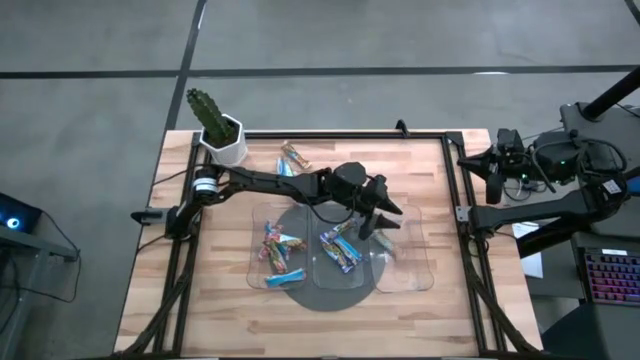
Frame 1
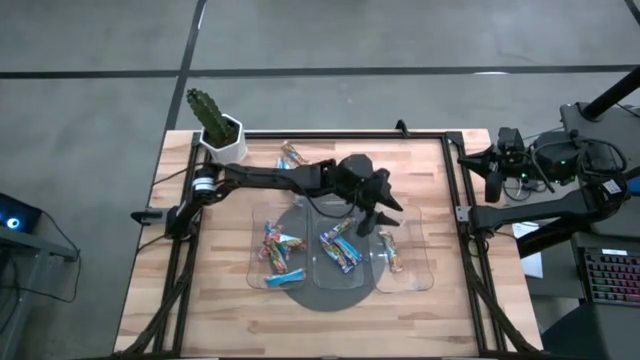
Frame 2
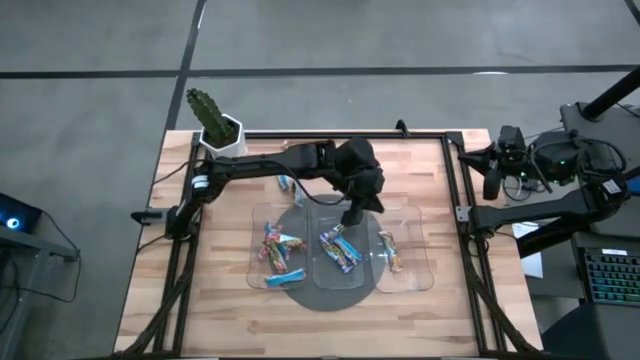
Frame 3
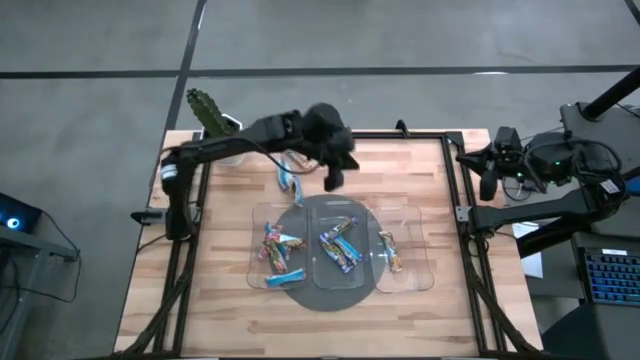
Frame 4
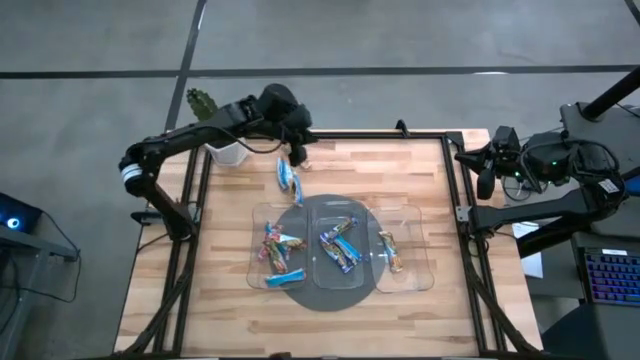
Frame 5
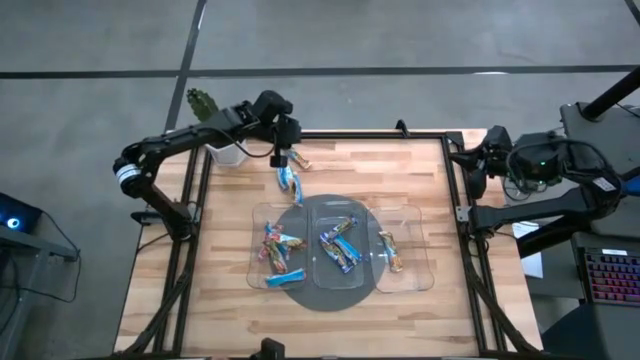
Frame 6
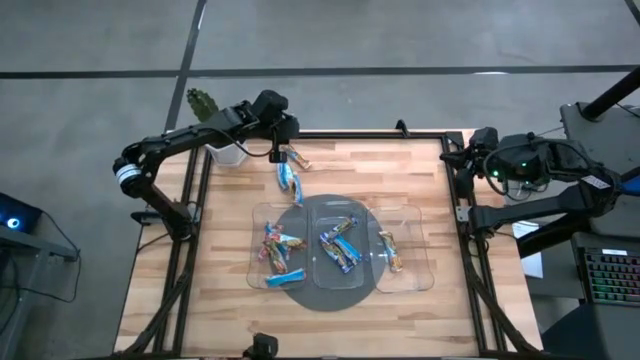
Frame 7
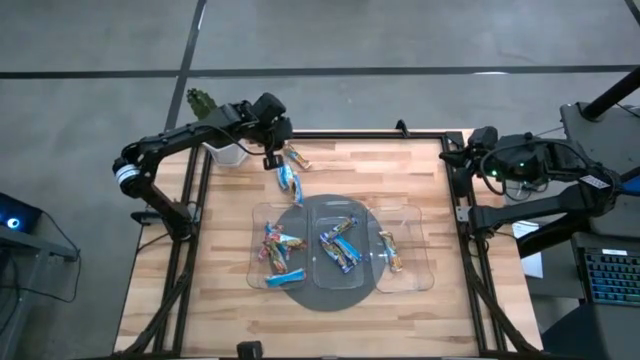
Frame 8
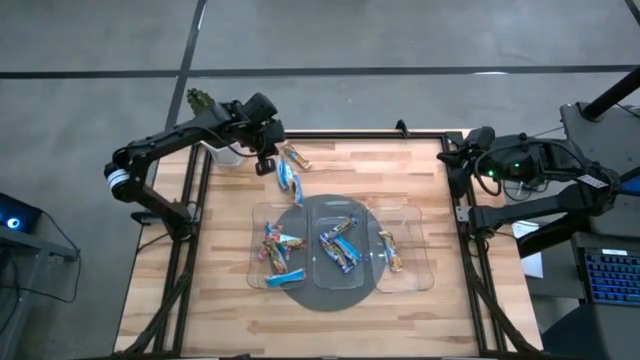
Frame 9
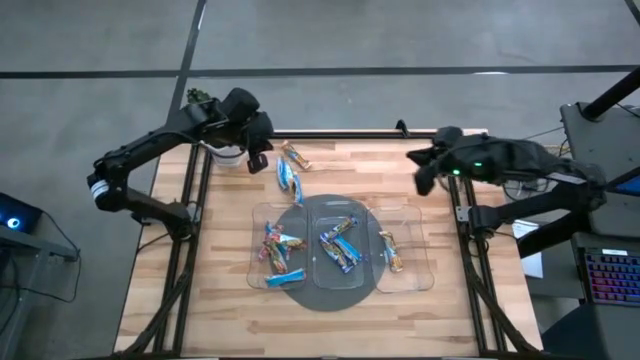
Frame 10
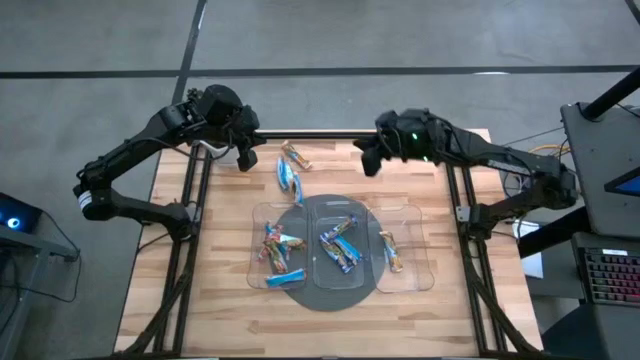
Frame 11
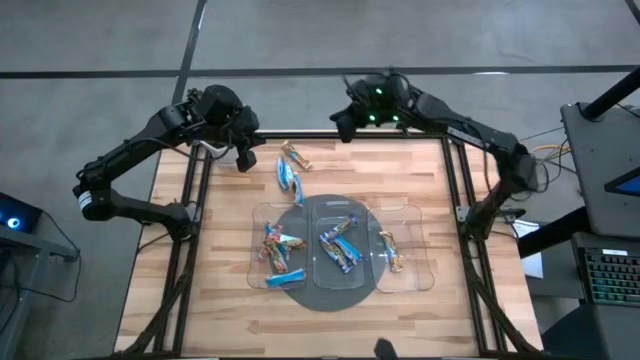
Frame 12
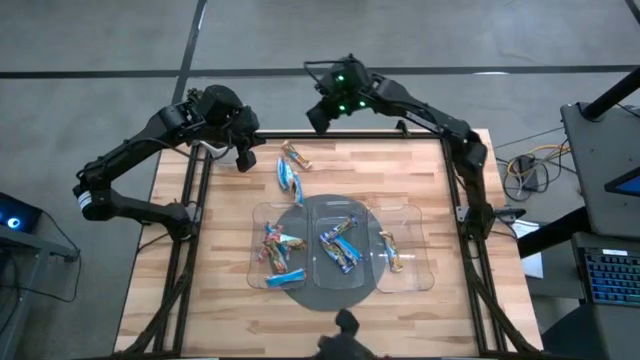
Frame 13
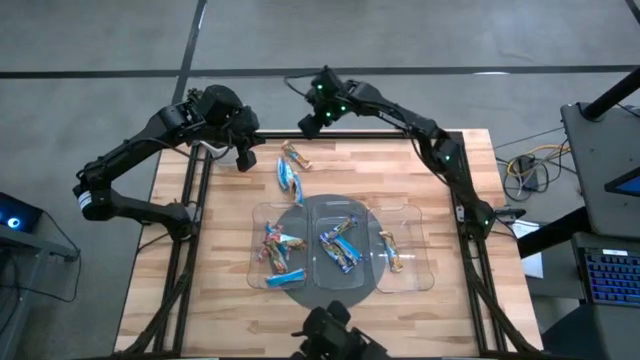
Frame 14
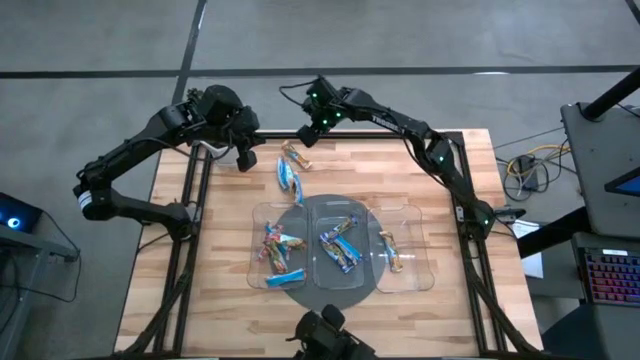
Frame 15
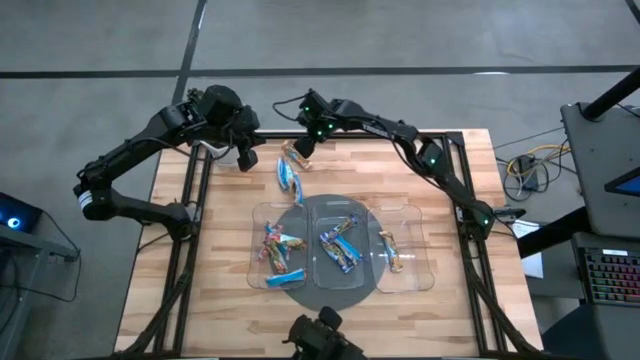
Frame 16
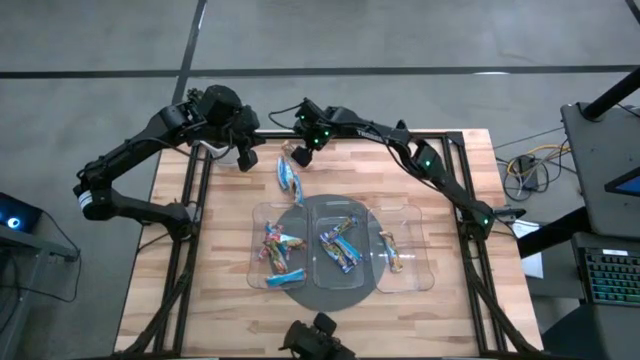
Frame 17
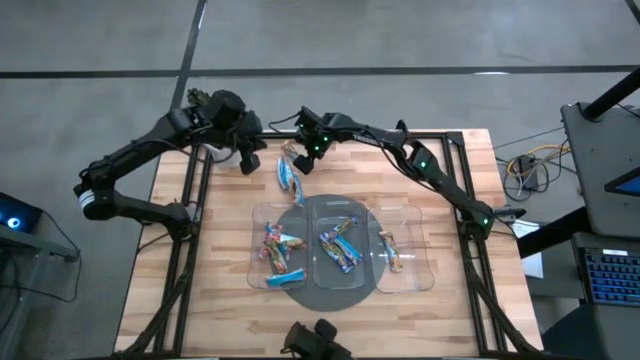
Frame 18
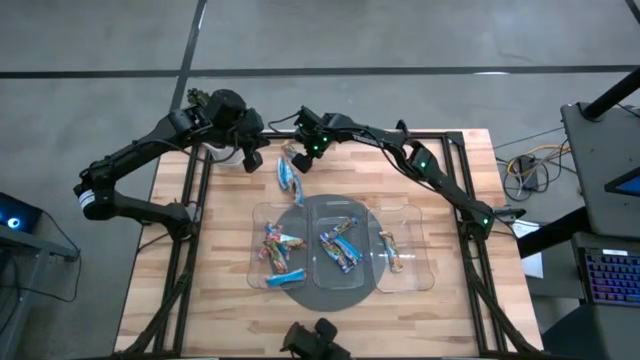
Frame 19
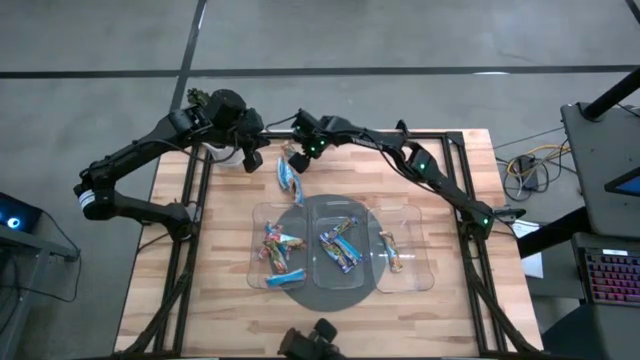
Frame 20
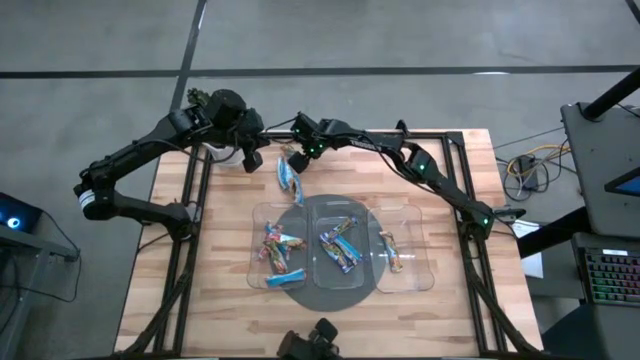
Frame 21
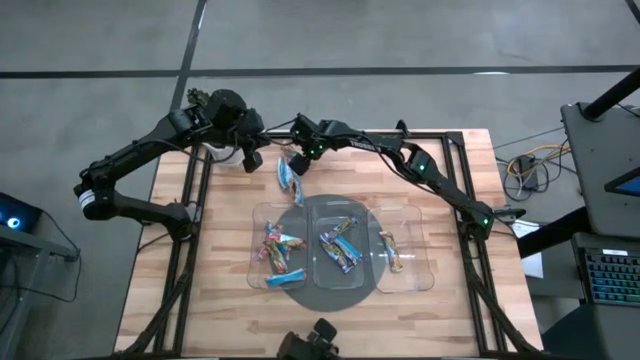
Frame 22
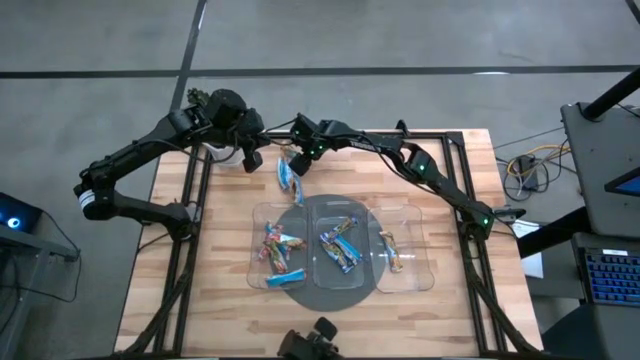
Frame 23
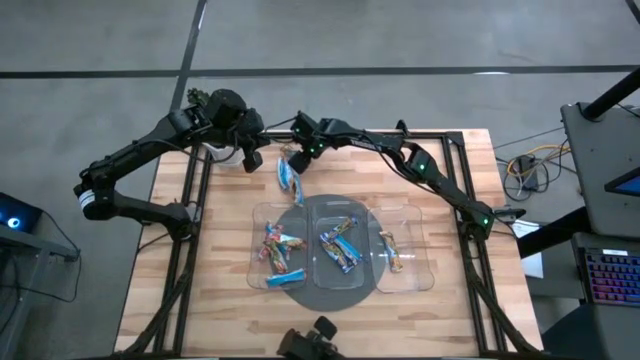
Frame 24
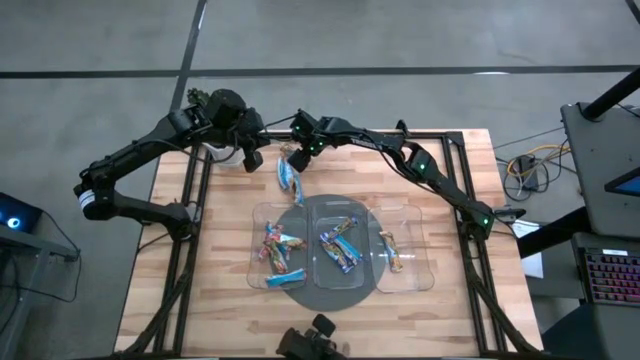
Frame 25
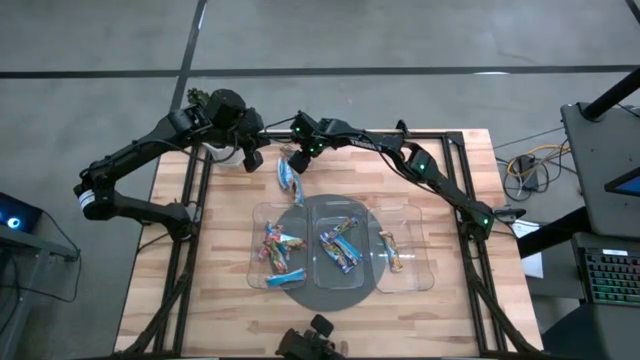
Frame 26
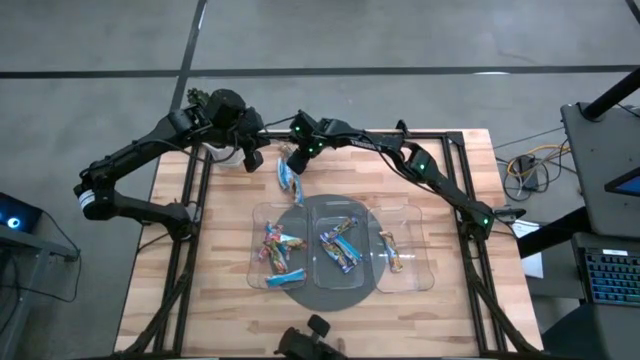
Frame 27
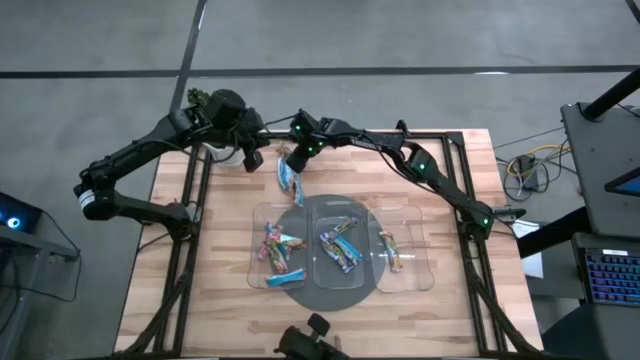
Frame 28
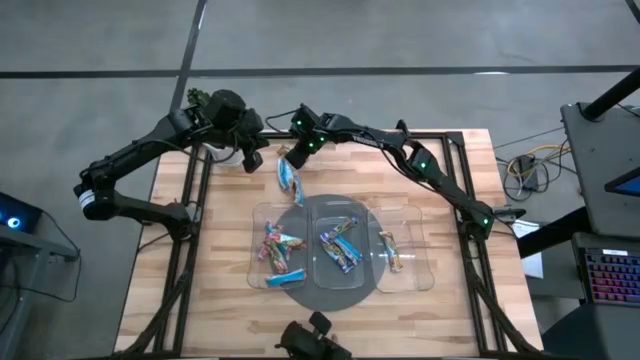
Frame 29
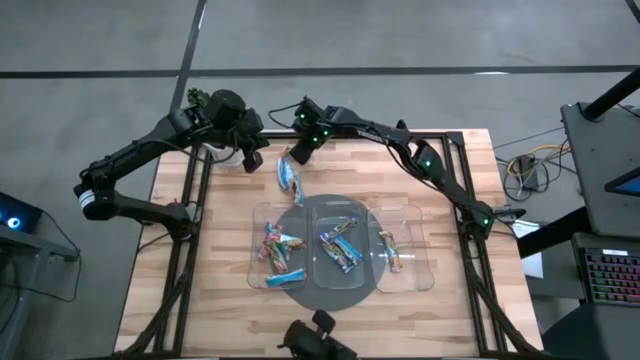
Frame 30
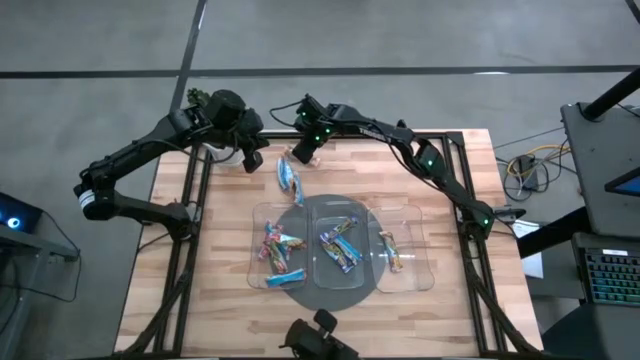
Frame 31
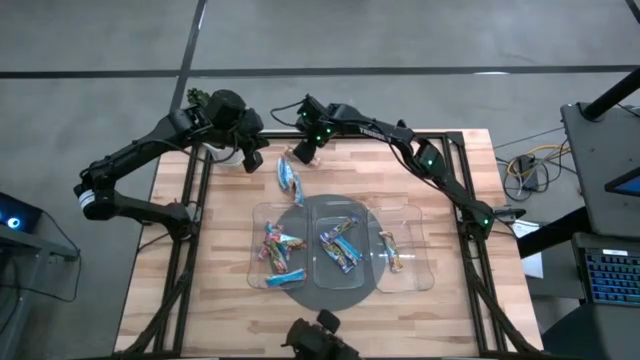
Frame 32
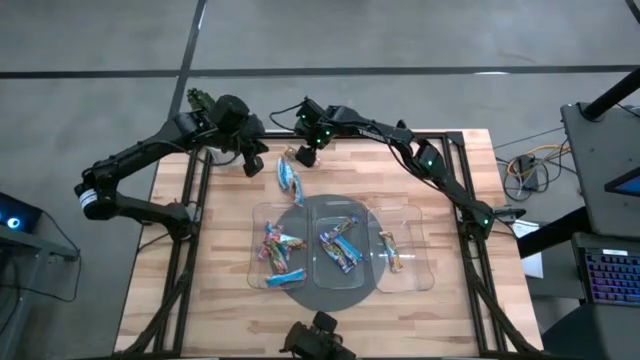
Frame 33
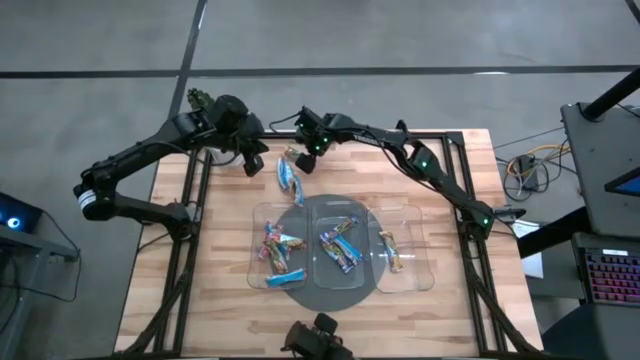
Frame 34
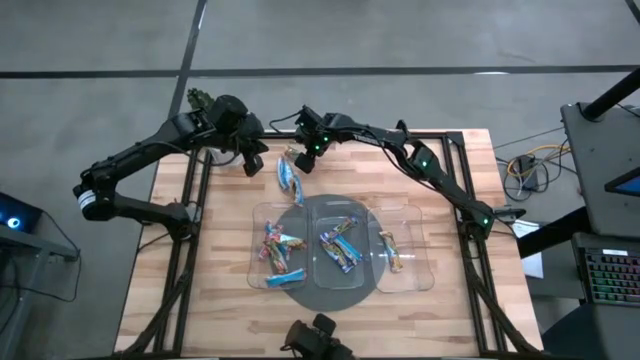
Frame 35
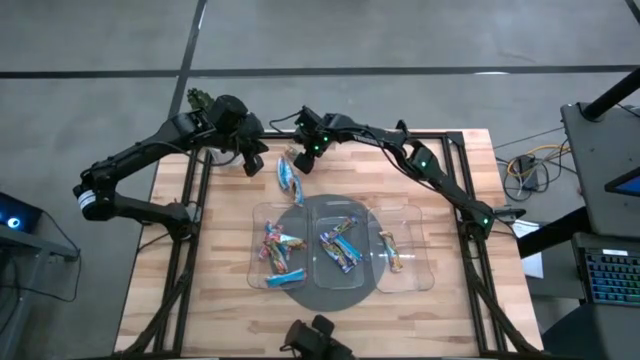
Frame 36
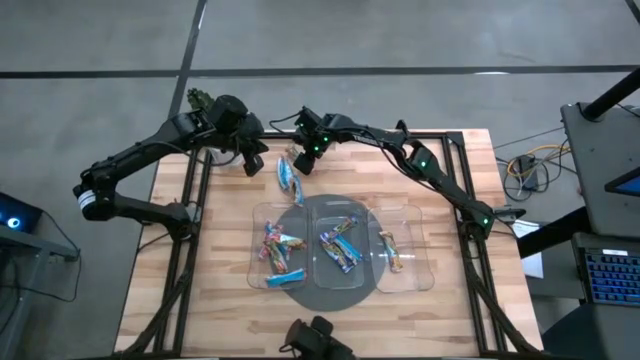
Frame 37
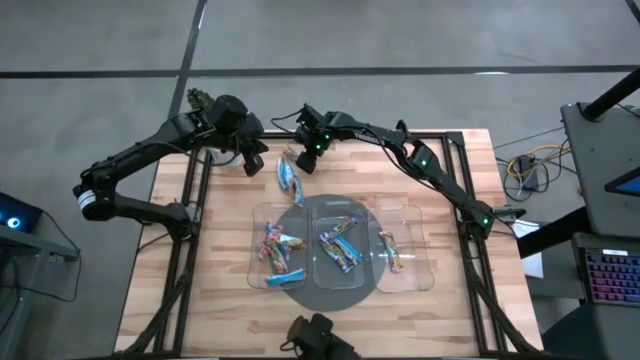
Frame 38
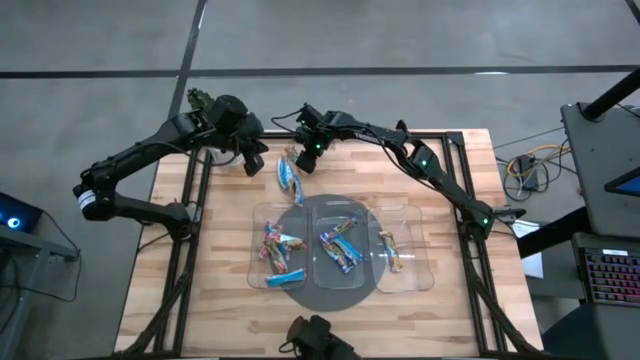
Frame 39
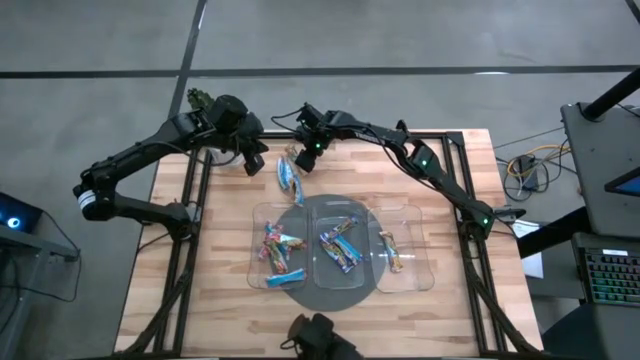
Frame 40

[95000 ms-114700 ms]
Task: Pick and place Granola Bars by type
Put the yellow granola bar into the right transparent bin

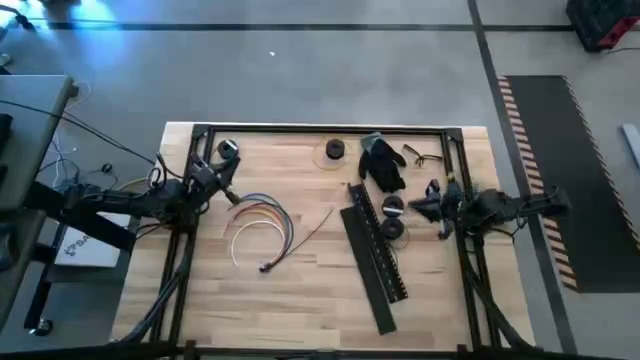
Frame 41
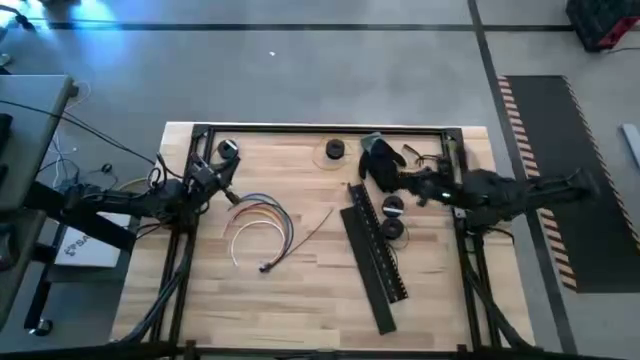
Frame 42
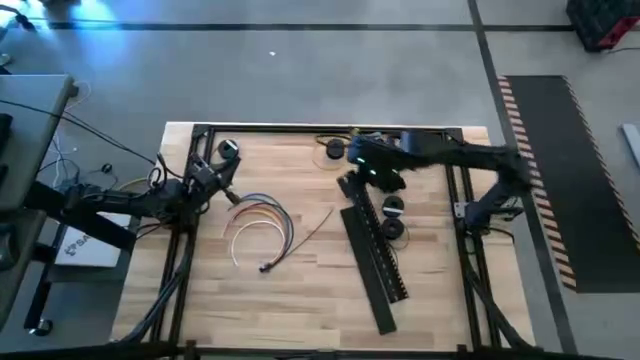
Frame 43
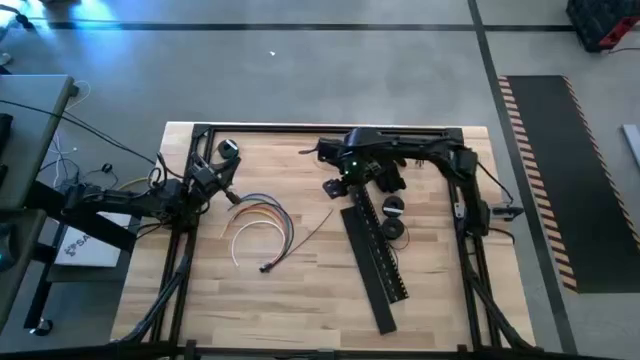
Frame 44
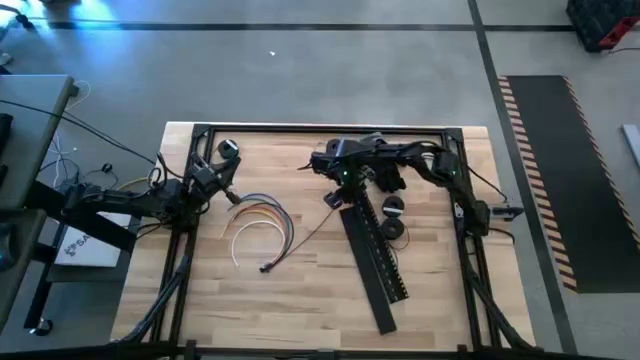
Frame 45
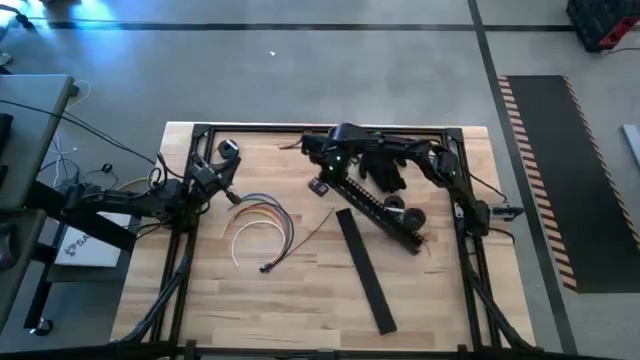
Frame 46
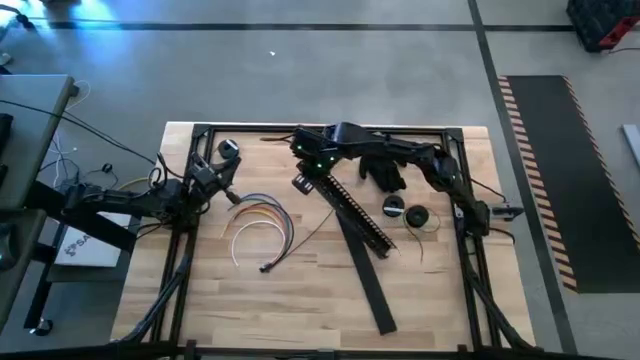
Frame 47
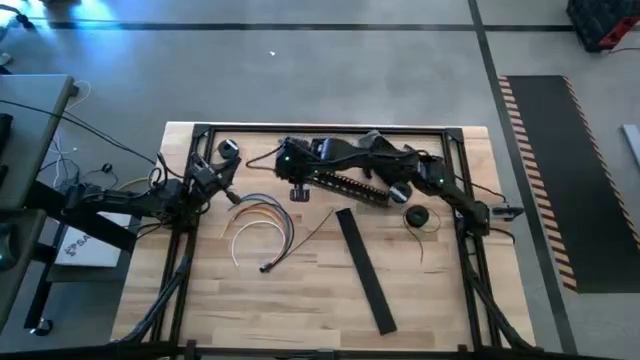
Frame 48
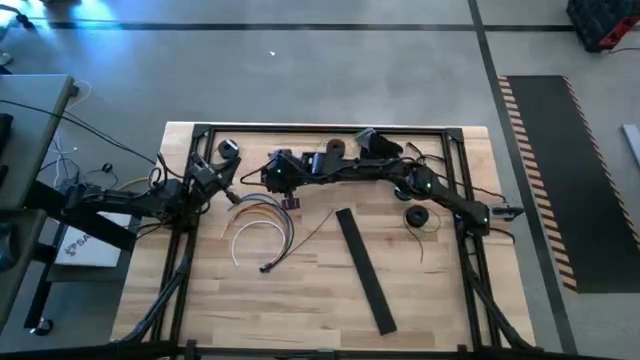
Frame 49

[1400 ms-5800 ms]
Task: Ziptie cables
Move the black cable duct to the top of the table
